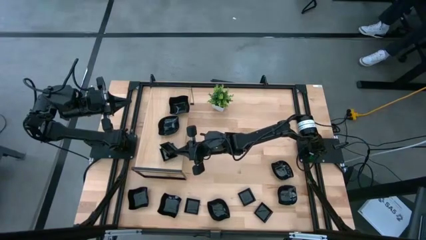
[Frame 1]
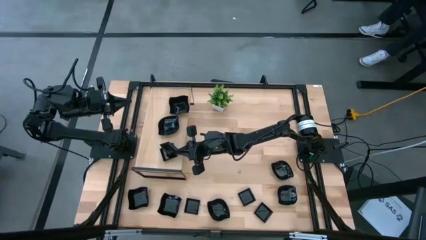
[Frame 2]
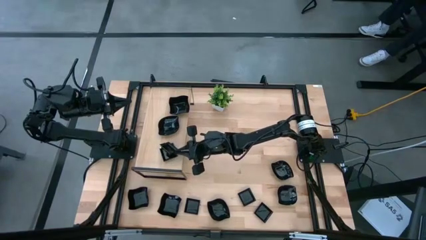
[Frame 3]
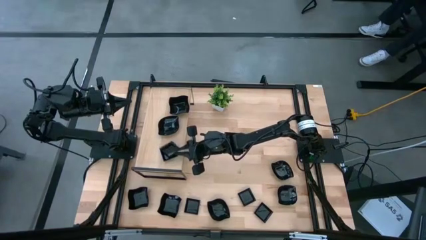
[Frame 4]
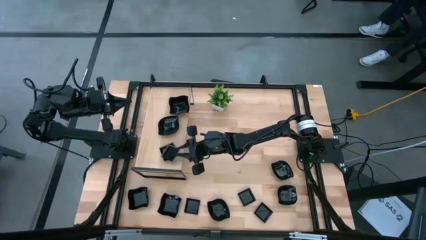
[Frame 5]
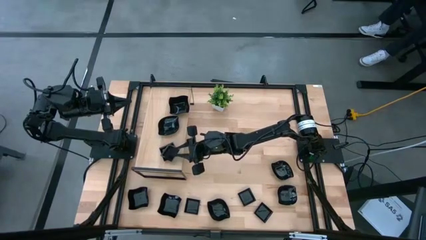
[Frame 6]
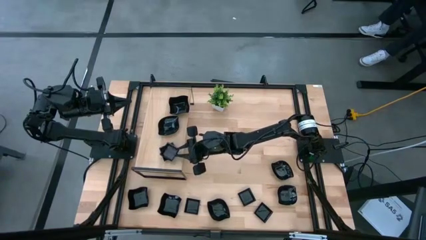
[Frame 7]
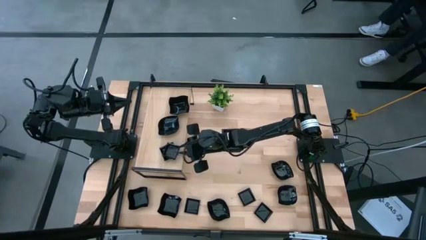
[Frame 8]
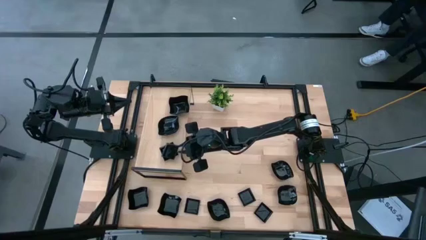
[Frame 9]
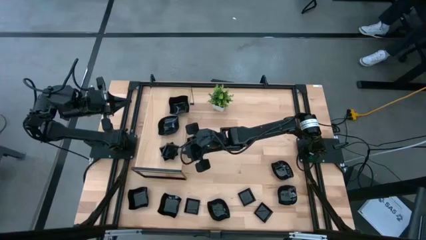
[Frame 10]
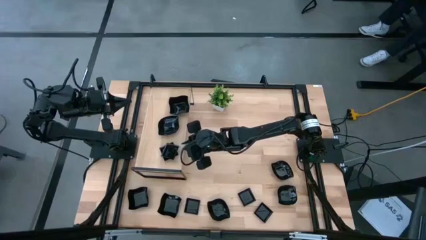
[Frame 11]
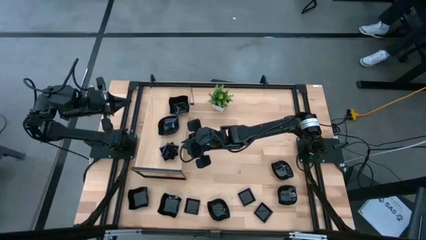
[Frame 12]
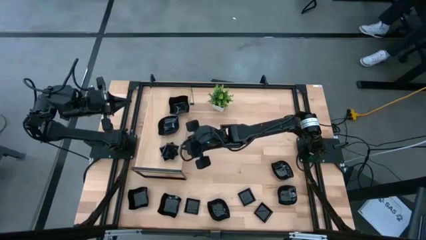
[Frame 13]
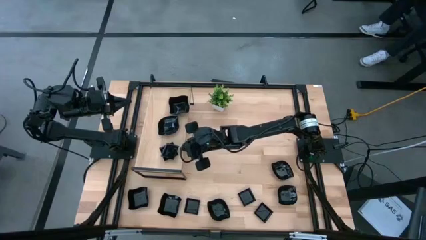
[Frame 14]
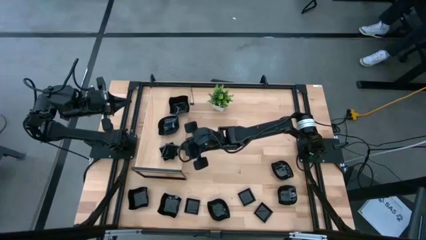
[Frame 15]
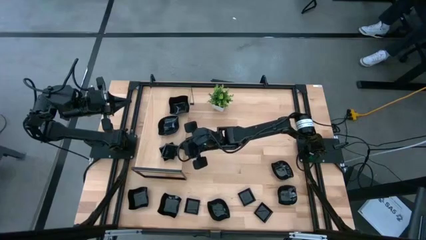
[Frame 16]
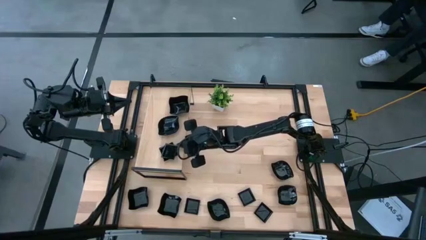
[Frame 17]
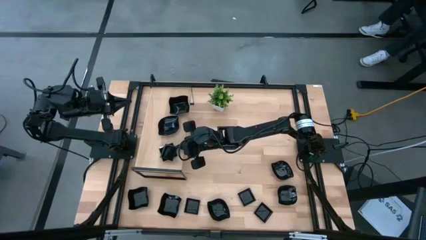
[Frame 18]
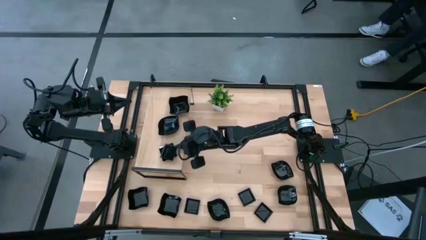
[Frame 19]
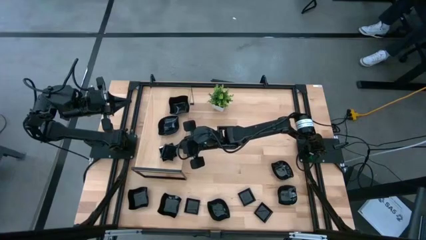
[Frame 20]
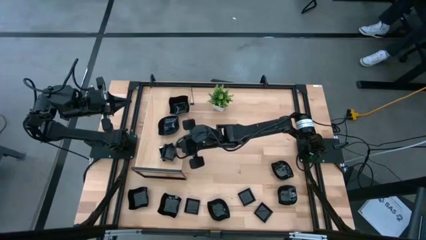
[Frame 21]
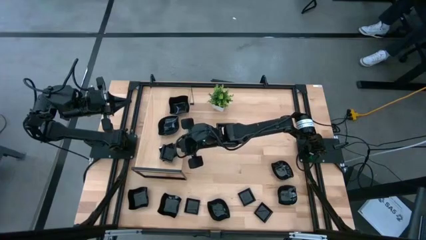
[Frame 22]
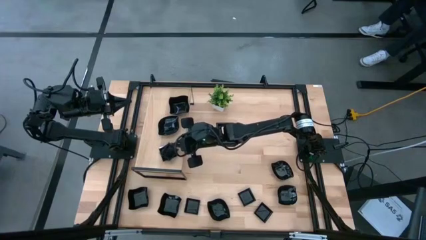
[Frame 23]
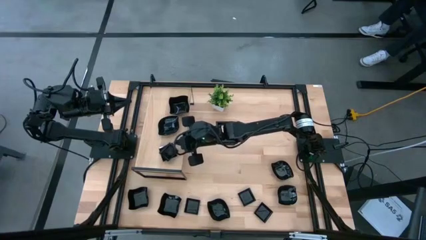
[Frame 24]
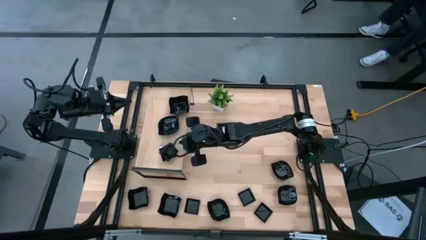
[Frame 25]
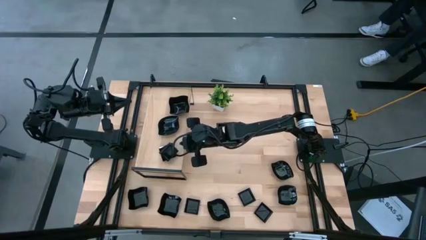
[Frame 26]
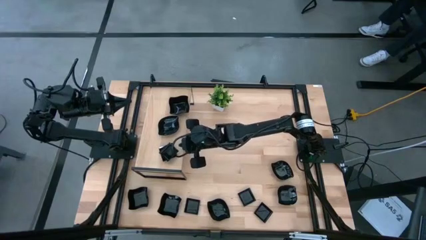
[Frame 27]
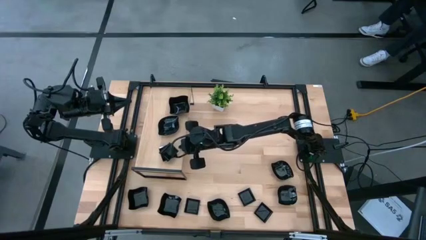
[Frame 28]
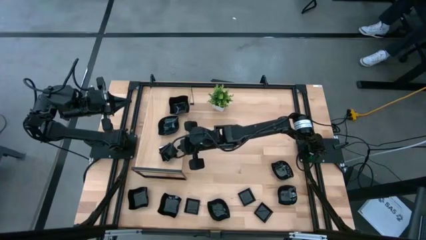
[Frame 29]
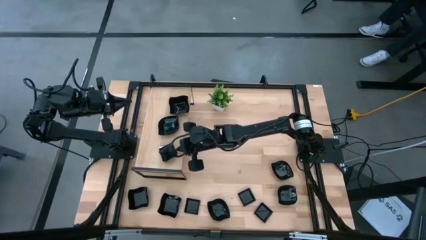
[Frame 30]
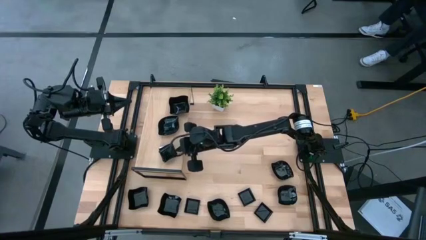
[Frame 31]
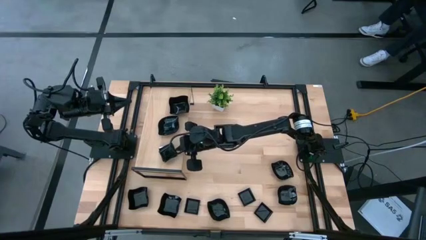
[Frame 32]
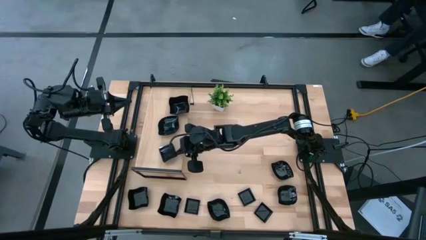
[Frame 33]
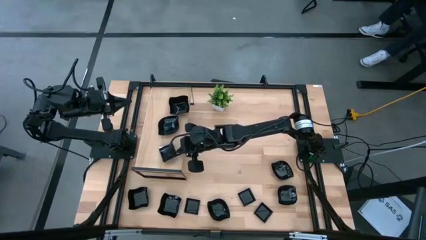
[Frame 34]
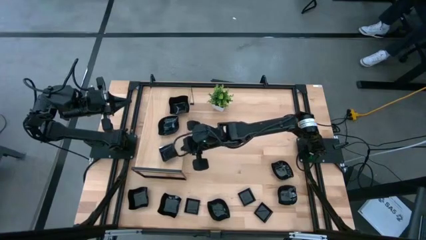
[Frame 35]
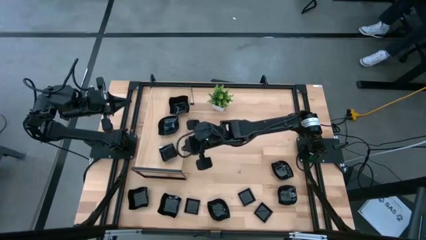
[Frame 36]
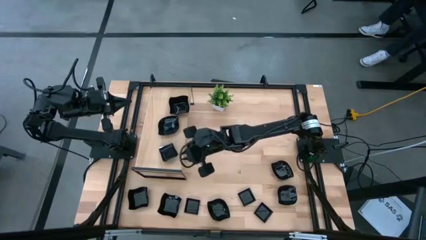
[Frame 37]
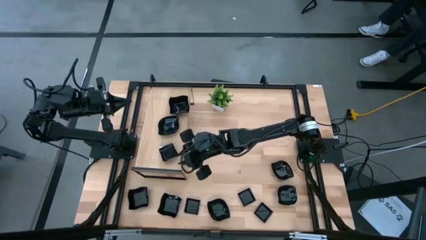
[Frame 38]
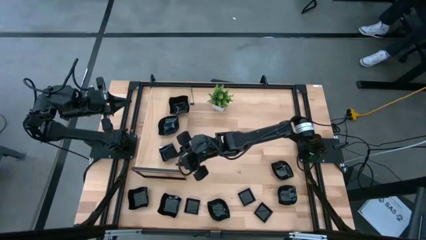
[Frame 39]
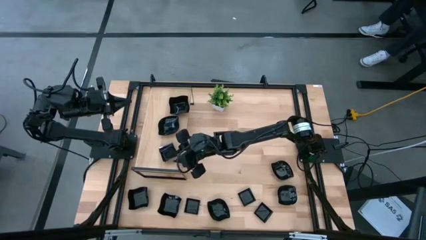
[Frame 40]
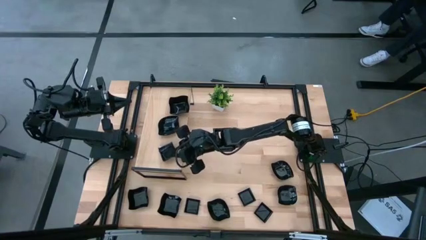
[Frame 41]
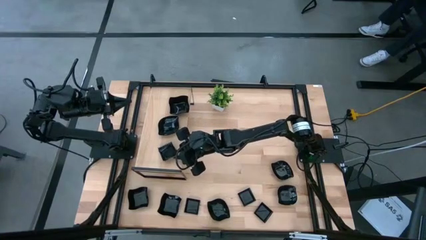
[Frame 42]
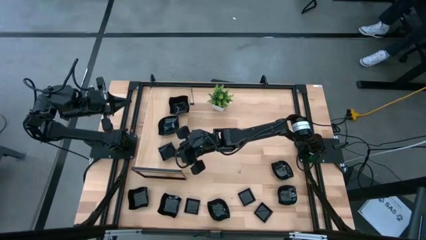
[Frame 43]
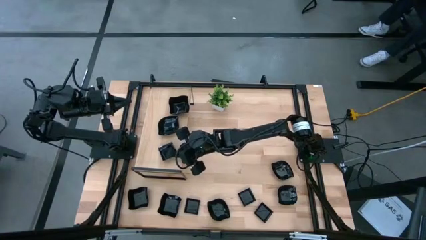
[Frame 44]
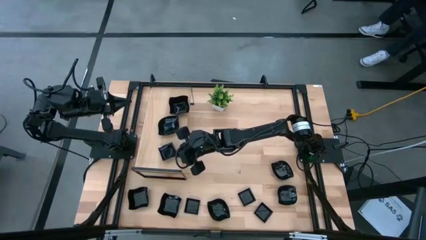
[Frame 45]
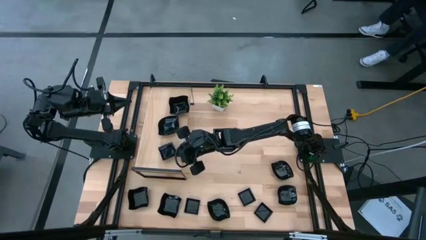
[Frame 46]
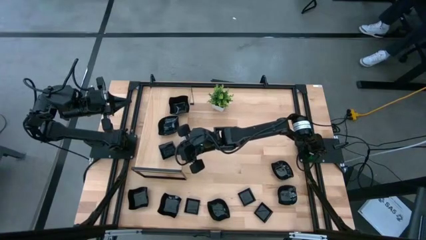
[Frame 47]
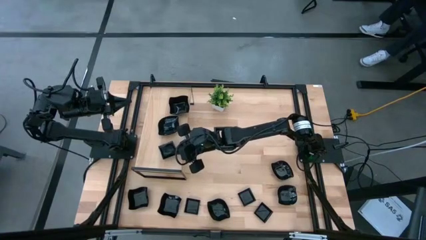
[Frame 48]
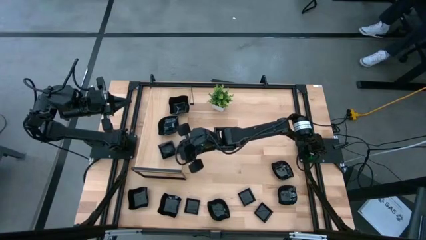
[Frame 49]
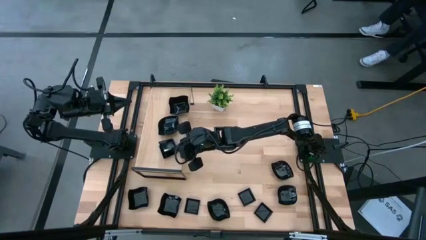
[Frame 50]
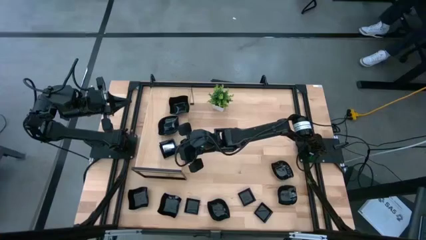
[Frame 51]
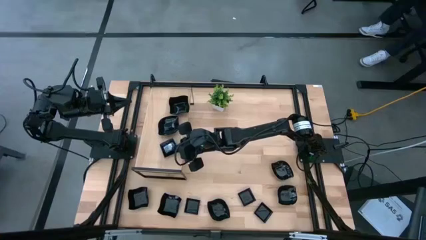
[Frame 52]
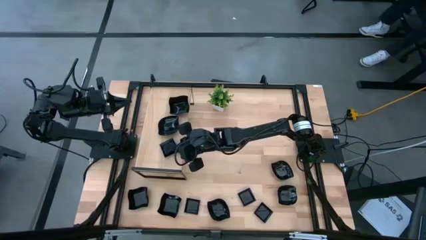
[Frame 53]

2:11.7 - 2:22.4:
Task: Pick & Place Mini shaped plates
Stack the black square plate on top of the black square plate on the shelf

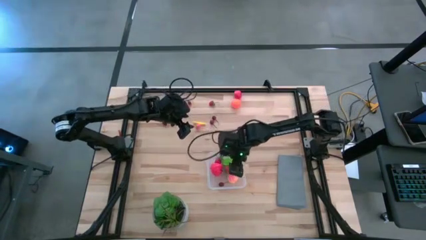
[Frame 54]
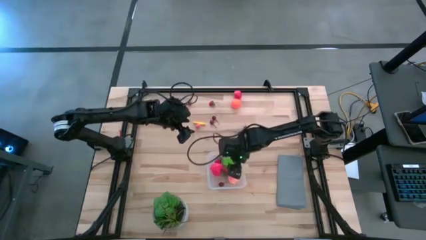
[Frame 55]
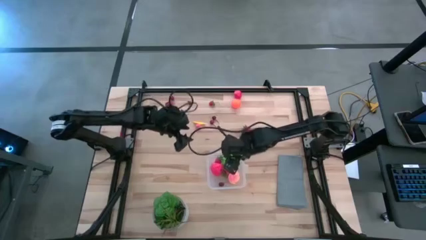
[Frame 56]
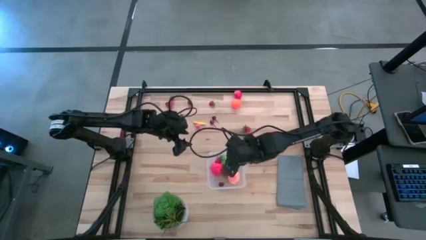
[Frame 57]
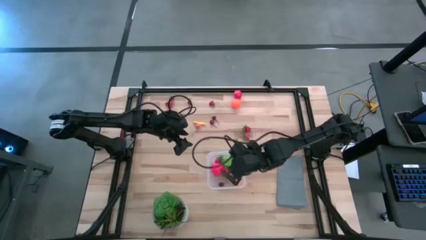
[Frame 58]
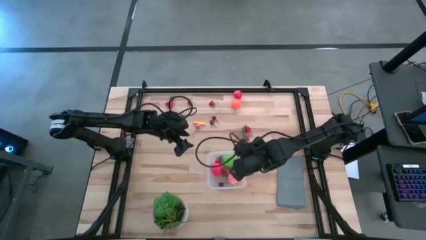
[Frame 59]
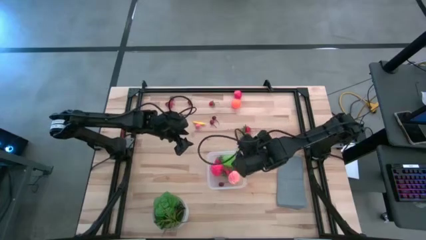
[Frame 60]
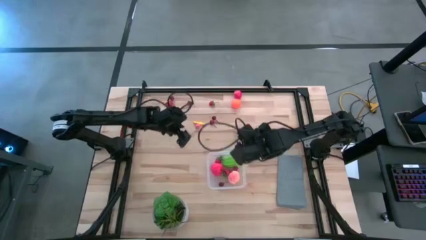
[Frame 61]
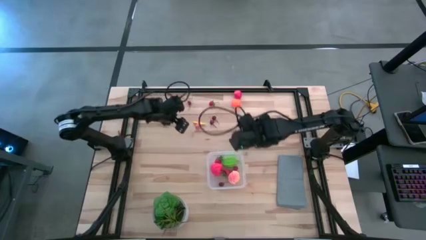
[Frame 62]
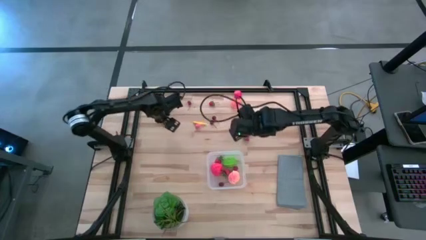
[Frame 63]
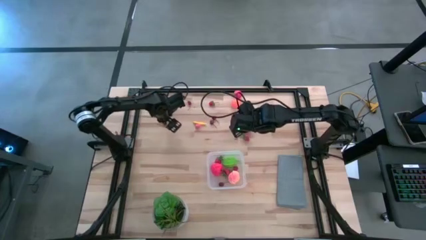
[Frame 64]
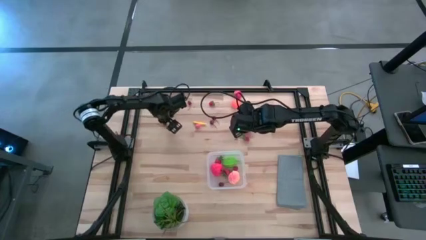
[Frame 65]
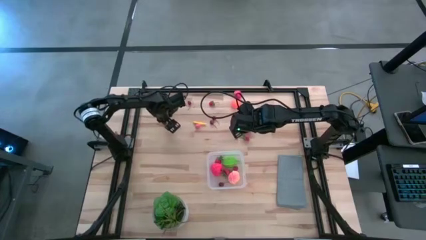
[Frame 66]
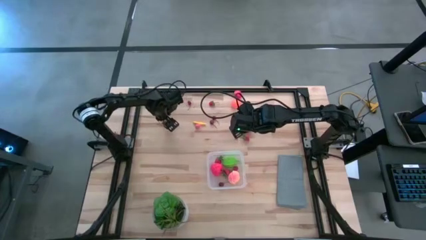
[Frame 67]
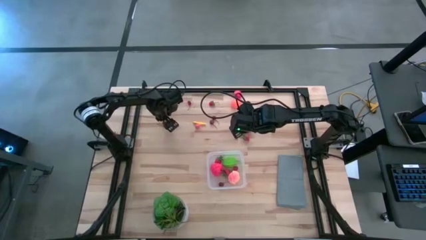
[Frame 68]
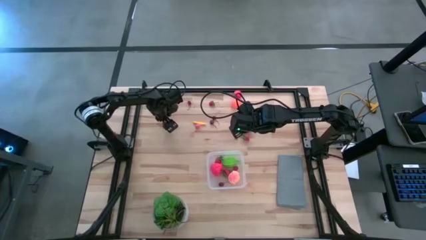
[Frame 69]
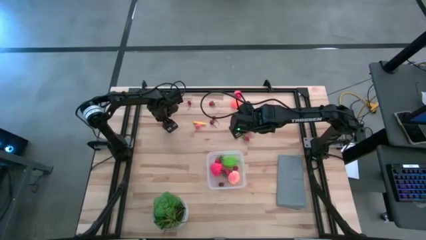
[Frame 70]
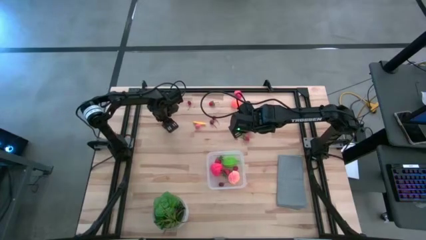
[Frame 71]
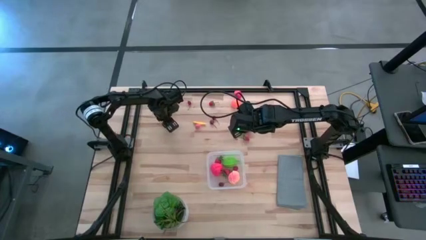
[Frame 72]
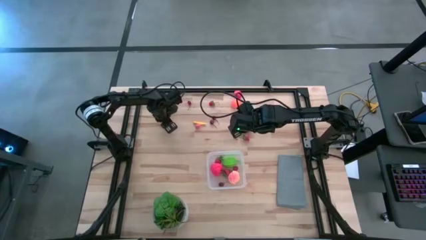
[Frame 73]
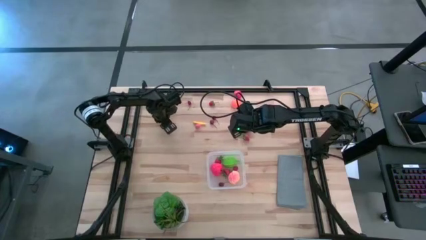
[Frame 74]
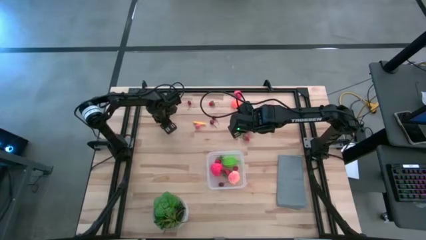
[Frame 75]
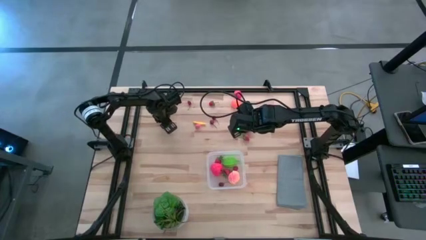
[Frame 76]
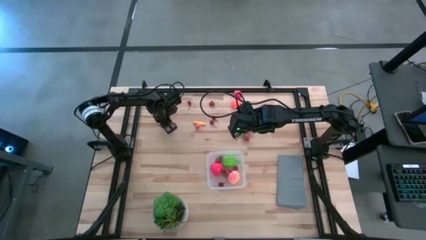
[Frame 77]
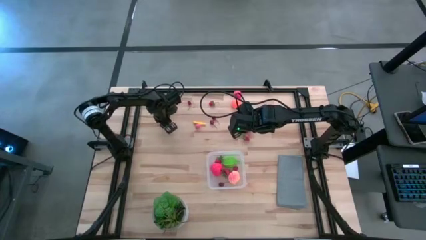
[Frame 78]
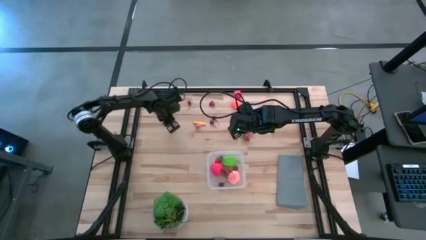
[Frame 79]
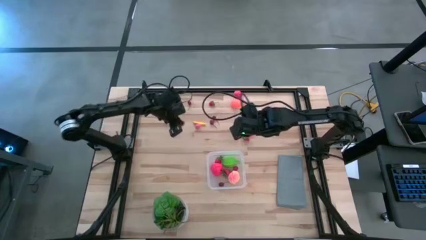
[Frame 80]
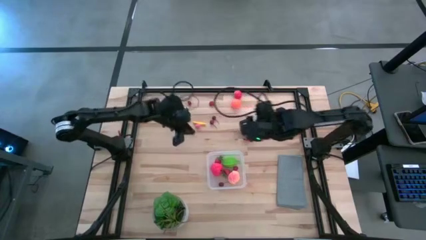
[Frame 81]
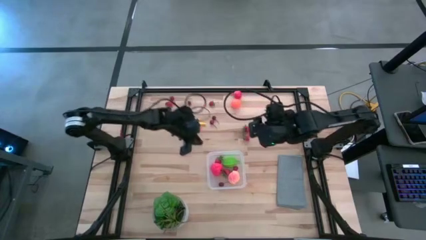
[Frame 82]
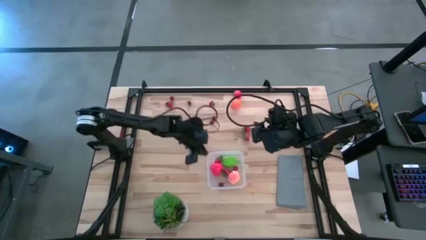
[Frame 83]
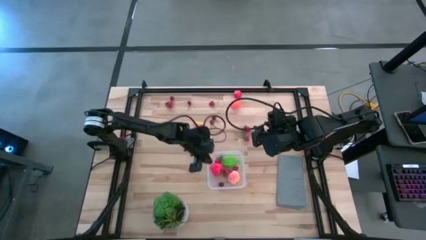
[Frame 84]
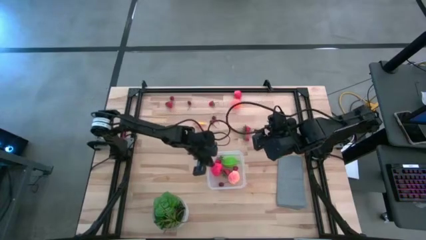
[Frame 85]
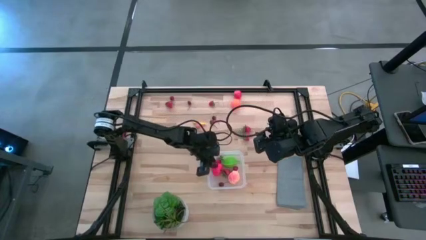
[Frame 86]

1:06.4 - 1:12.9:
Task: Pick and placing Produce into tupperware
Put the red cherry into the transparent bin
